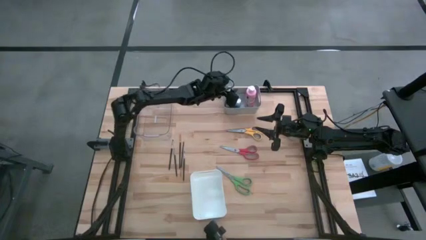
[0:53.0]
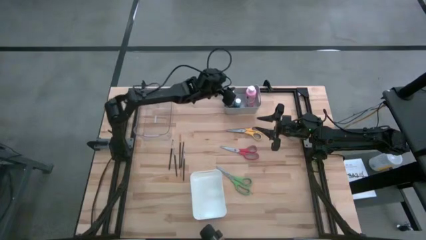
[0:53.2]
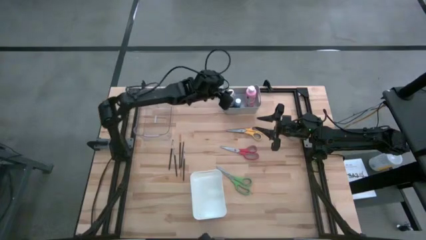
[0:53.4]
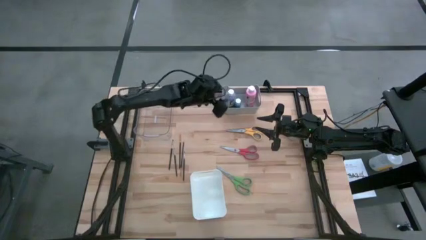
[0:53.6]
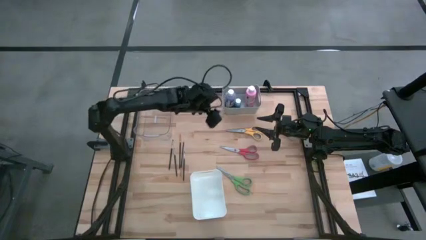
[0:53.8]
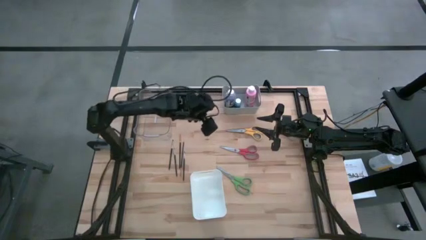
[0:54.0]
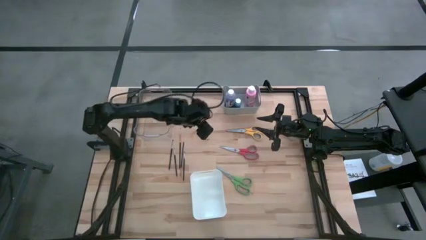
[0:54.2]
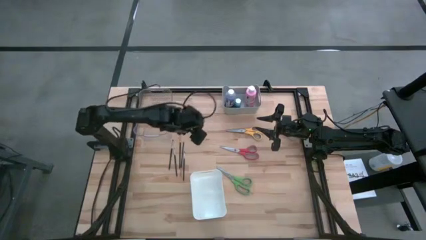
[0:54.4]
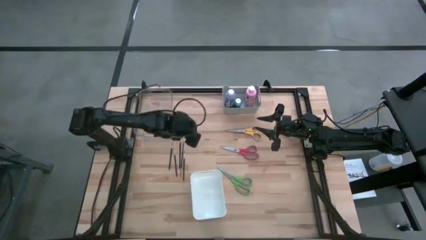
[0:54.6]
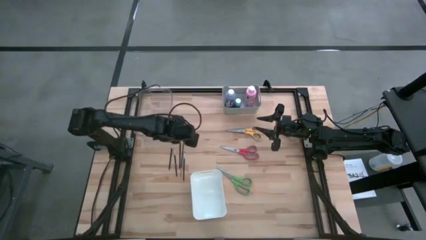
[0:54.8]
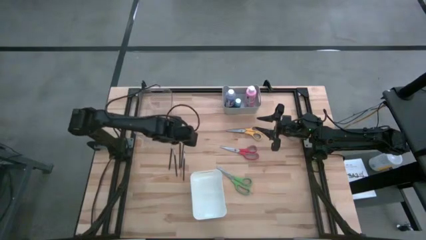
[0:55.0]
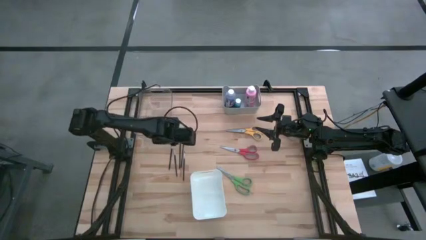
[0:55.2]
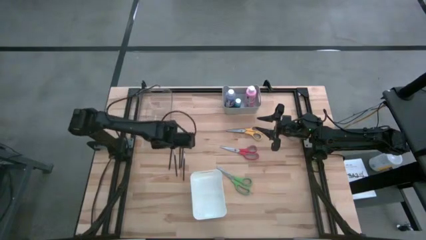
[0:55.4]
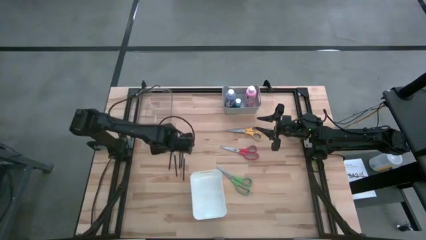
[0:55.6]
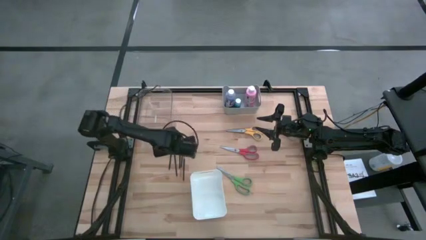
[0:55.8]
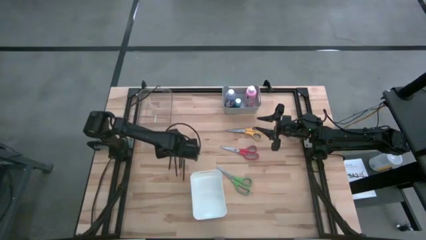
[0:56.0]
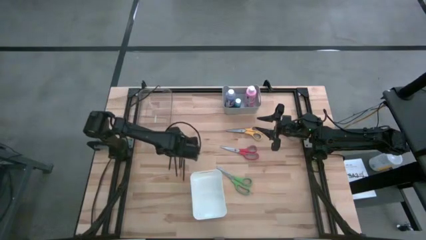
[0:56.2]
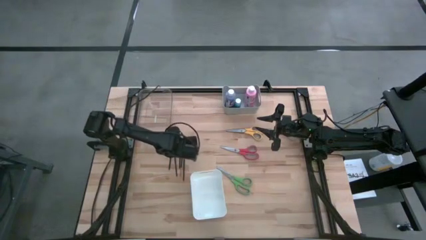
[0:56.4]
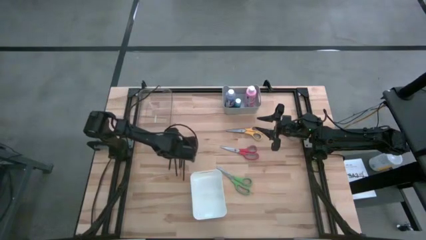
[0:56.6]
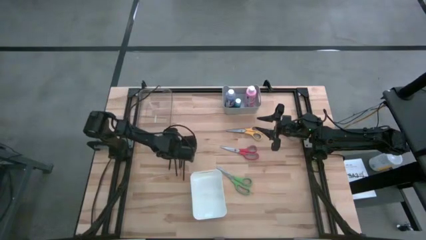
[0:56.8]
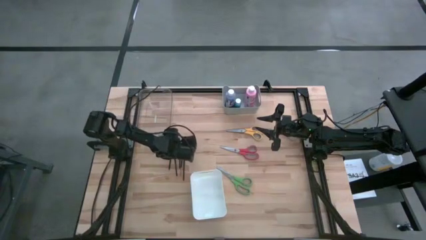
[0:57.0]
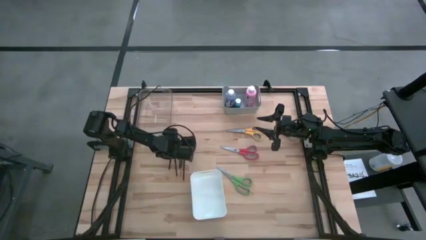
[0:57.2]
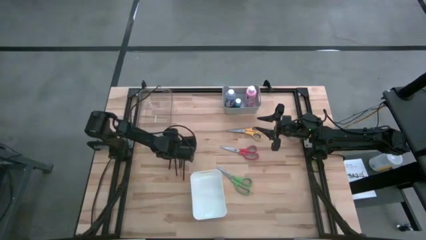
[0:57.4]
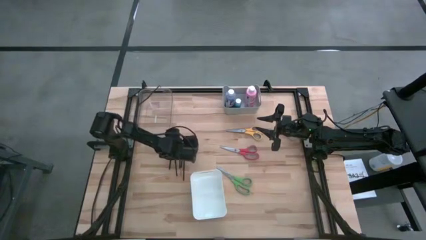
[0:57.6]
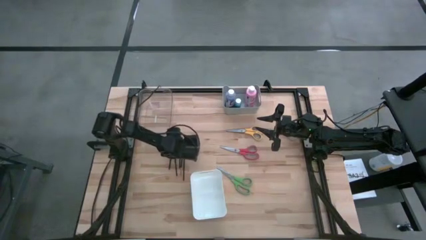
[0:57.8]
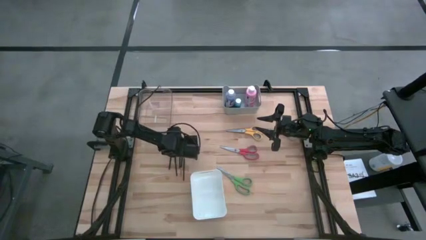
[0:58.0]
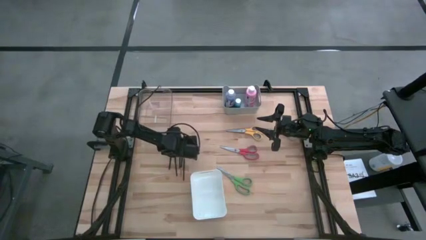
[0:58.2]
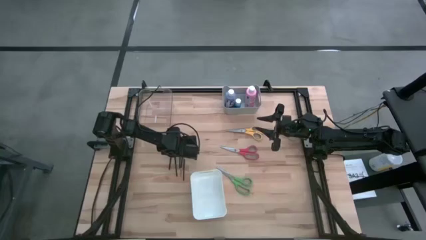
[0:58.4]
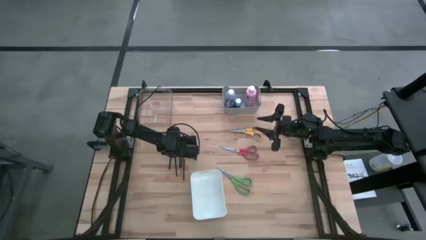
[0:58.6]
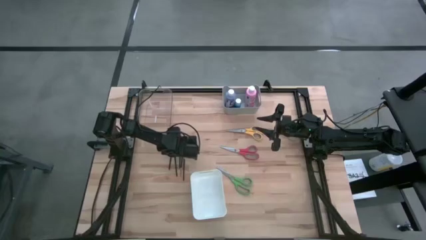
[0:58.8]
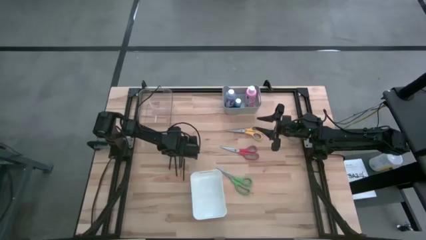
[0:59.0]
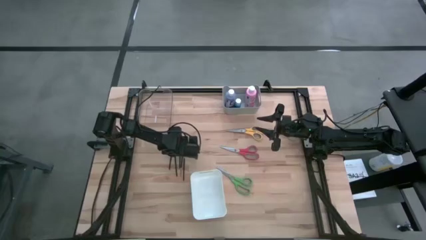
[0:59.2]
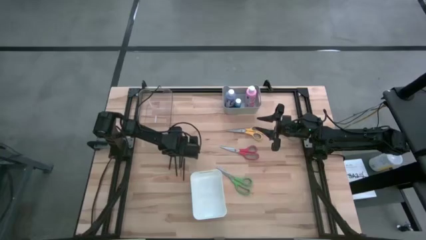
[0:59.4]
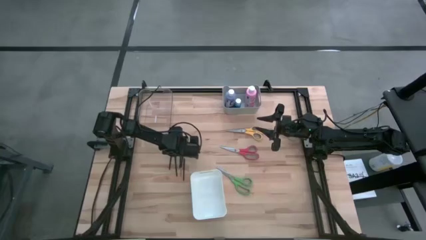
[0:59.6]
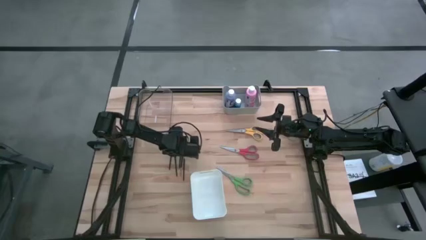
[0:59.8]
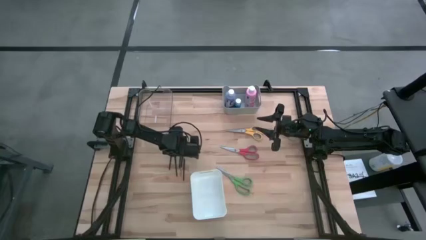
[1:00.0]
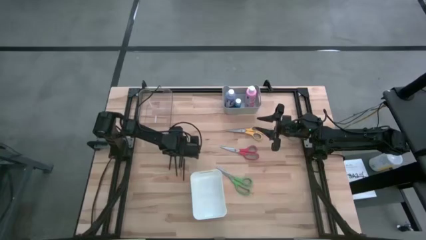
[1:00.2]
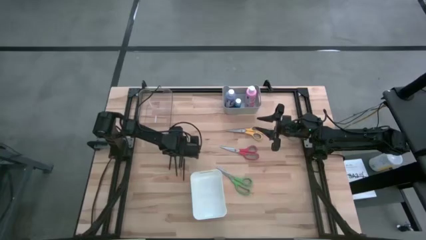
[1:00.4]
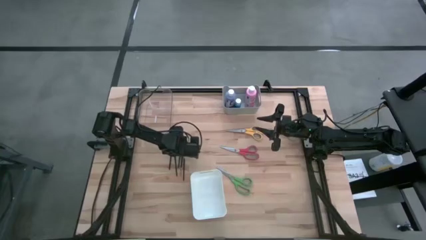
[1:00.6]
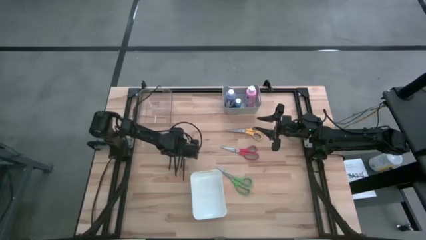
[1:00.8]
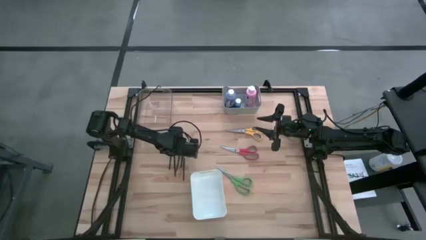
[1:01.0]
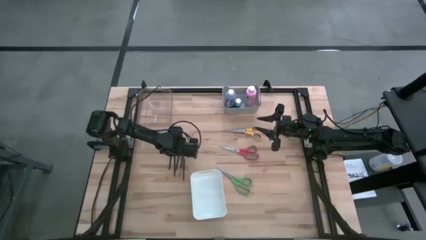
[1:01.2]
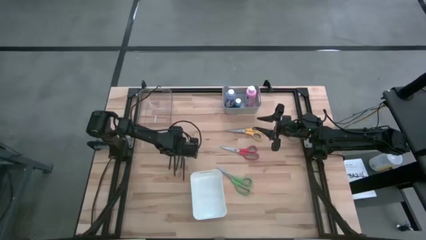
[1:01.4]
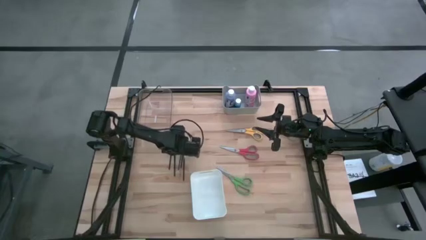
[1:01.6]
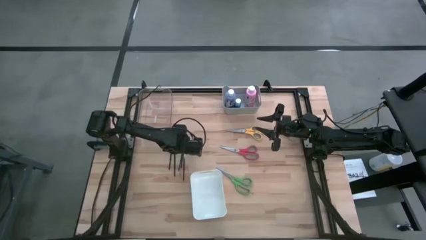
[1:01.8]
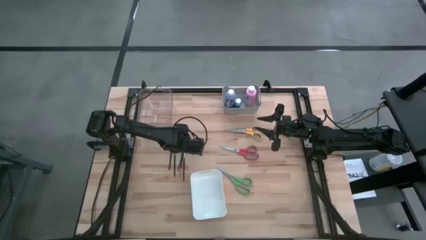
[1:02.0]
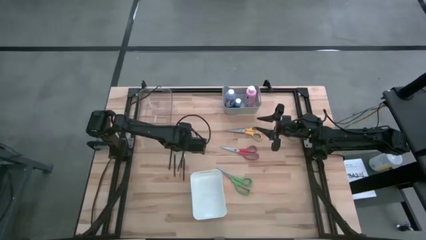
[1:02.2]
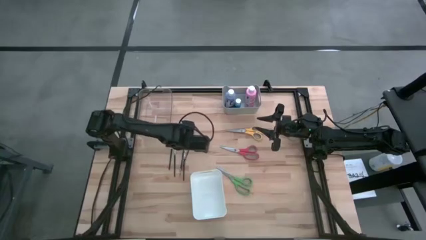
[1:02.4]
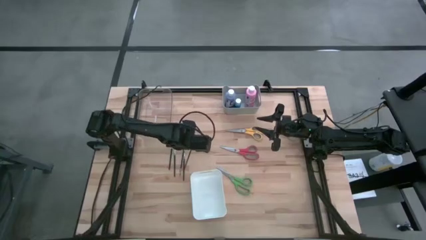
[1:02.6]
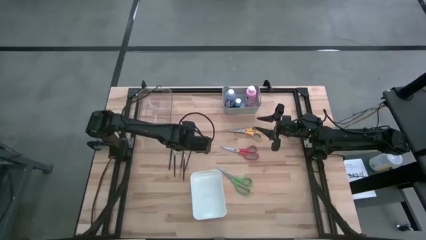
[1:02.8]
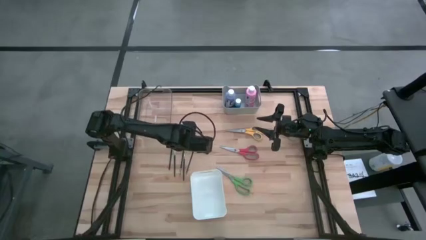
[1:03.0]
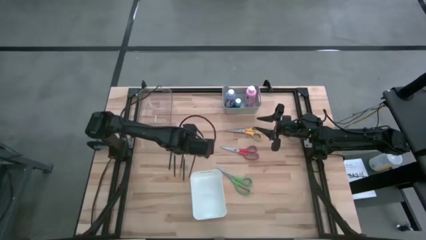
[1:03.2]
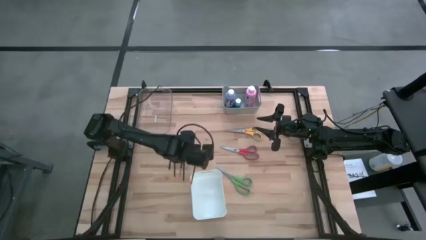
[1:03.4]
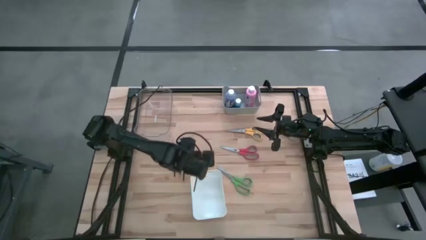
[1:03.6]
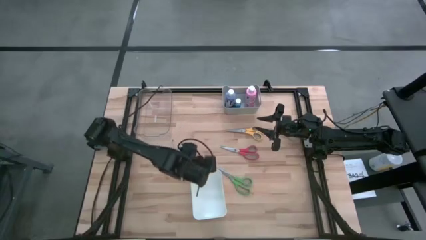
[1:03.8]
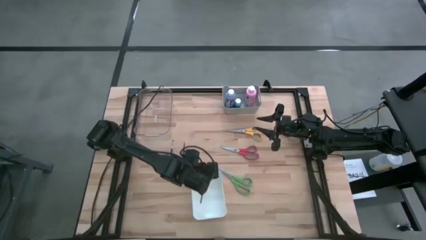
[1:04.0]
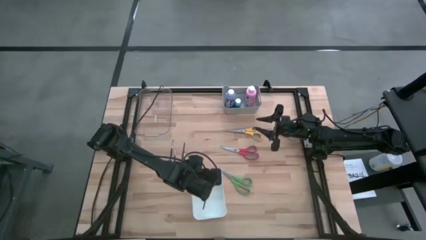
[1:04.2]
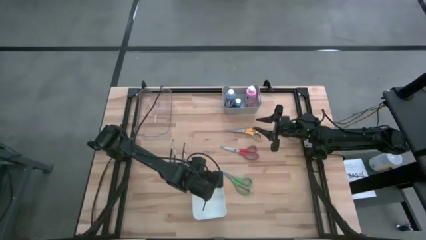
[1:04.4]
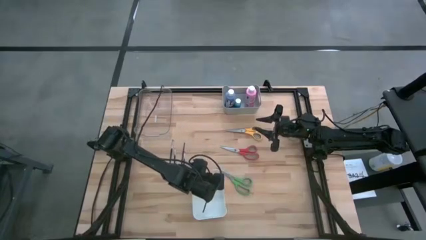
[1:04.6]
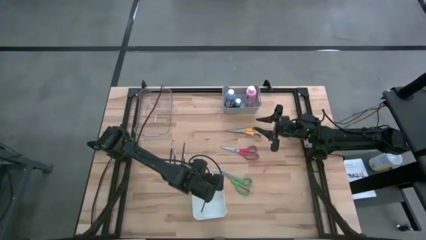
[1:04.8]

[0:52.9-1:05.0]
Task: Pick & Place Paint Supplies
Put the left gold paint brush into the white bin

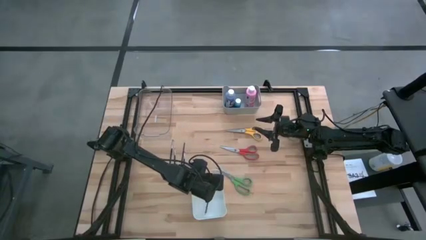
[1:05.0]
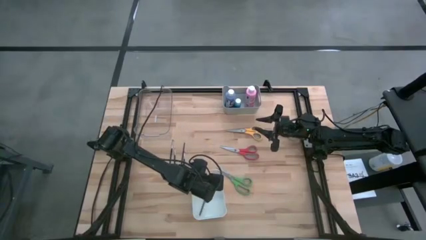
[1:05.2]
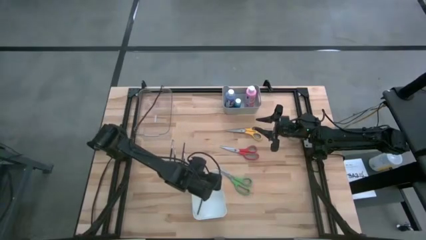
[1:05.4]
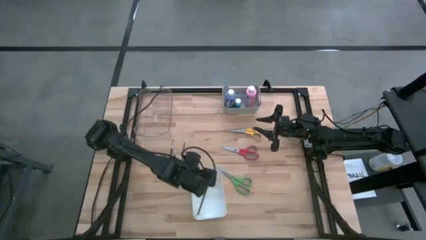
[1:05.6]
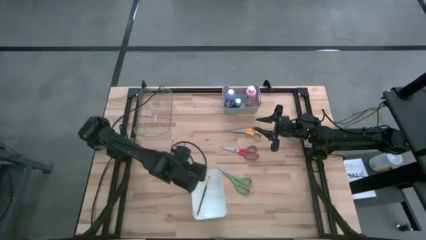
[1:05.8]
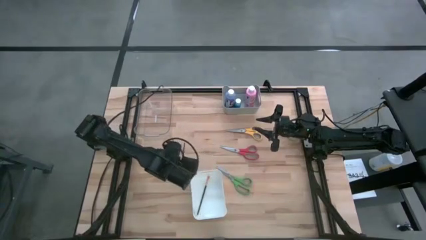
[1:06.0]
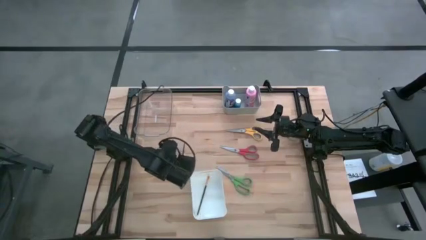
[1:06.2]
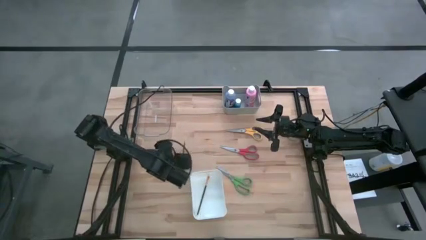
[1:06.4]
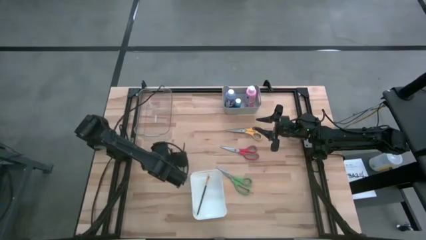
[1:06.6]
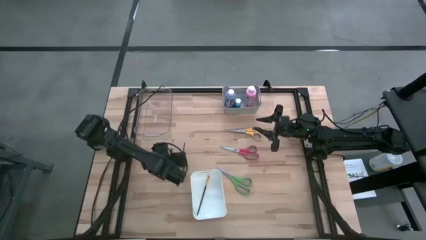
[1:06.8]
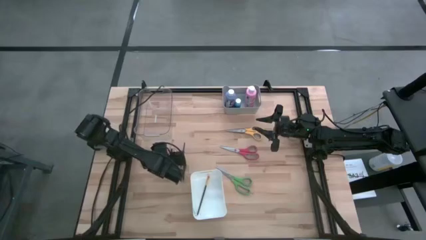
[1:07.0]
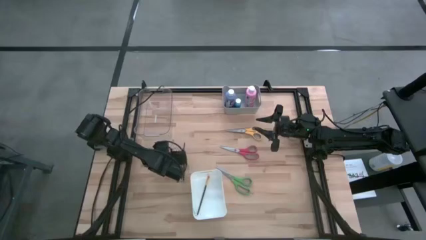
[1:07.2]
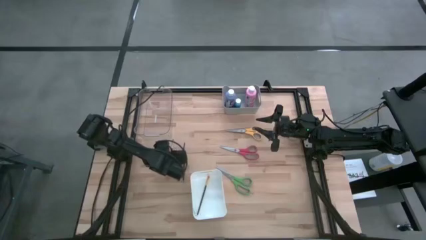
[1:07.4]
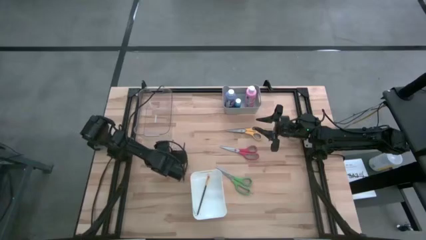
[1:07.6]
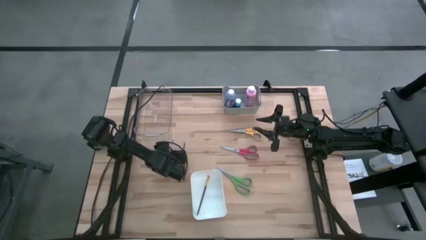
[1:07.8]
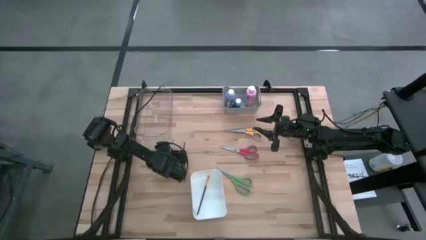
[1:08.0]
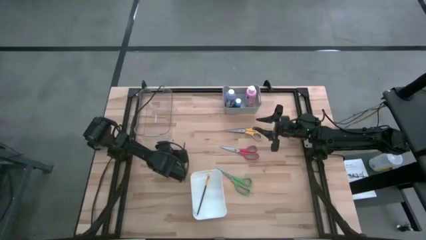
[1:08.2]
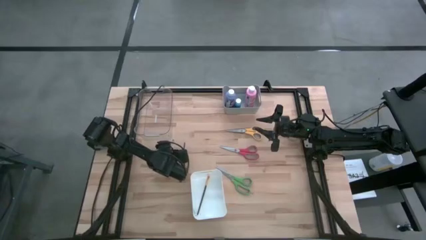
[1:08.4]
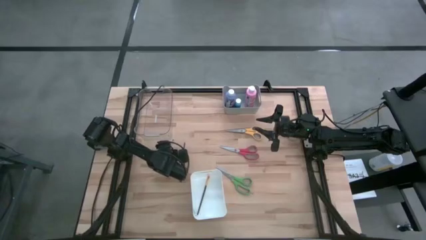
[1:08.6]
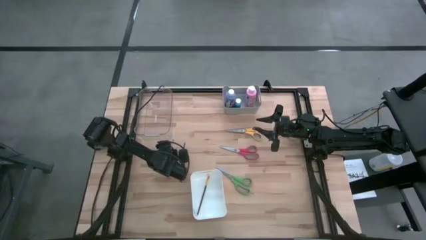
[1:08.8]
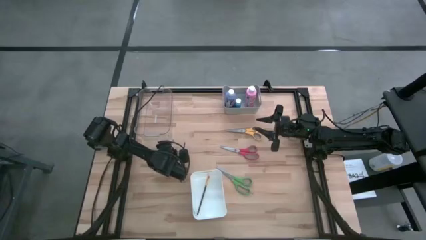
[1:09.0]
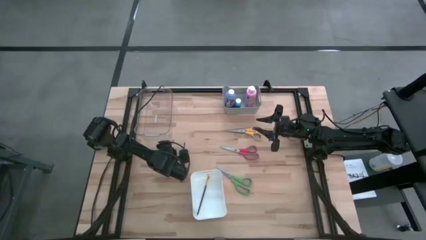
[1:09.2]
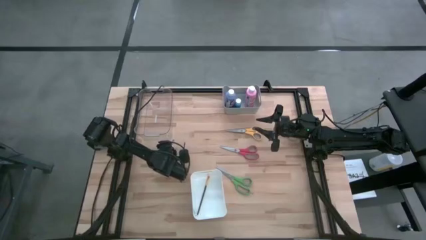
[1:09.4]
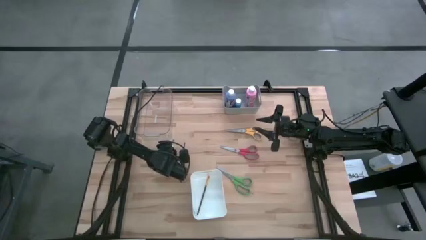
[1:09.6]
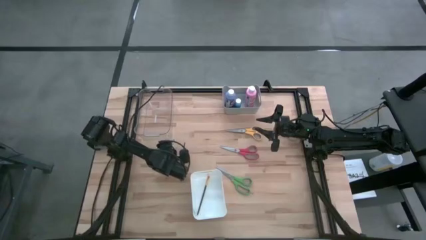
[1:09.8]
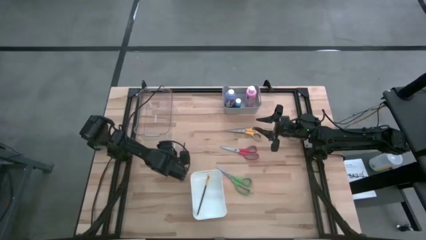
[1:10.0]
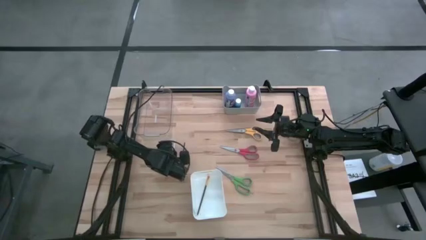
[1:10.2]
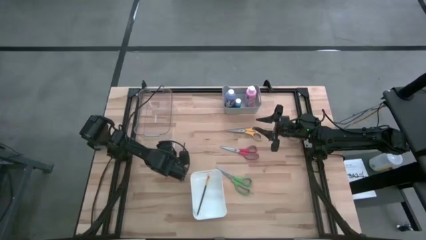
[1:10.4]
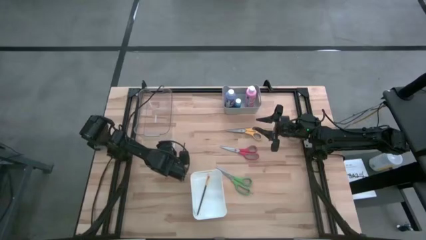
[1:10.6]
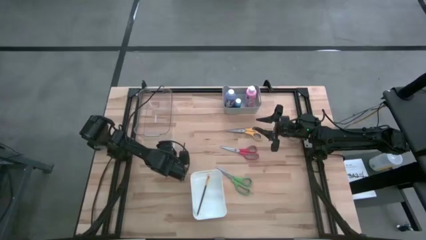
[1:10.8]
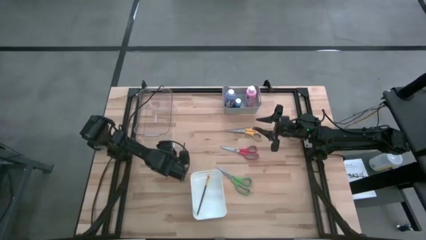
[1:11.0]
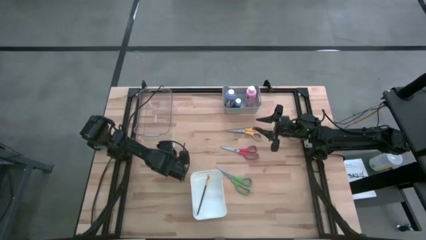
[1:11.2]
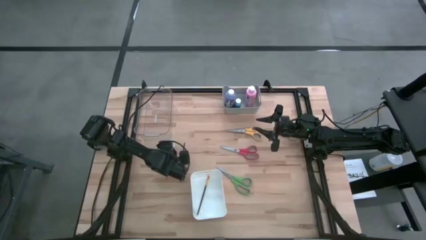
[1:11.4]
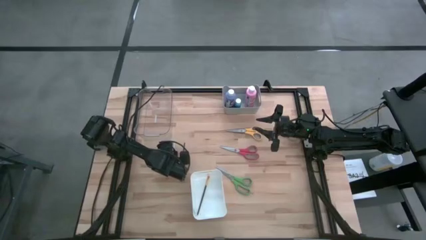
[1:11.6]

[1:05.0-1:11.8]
Put the left silver eyeshadow brush into the gray bin
